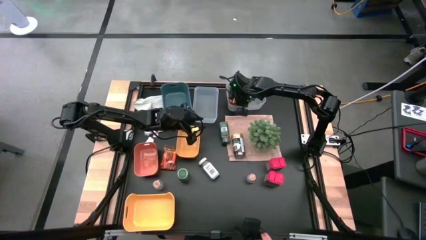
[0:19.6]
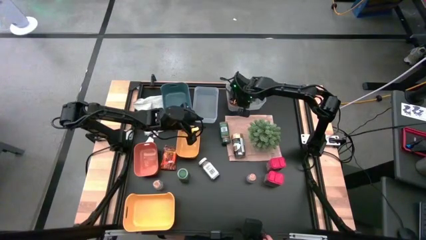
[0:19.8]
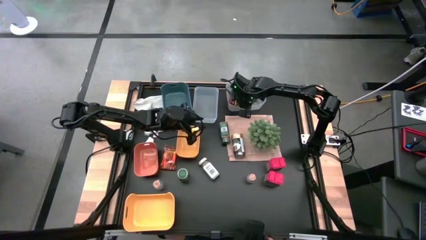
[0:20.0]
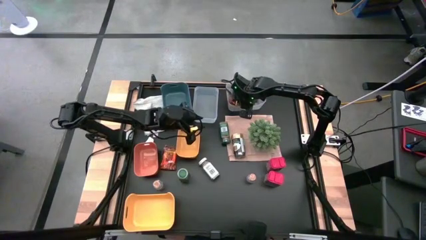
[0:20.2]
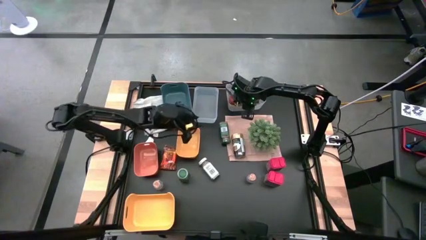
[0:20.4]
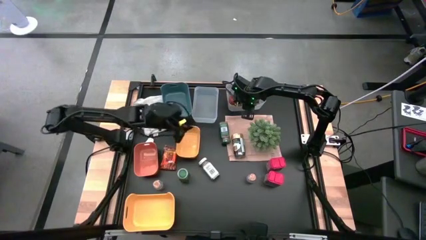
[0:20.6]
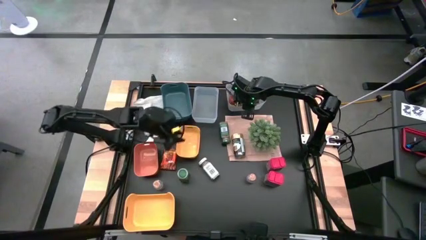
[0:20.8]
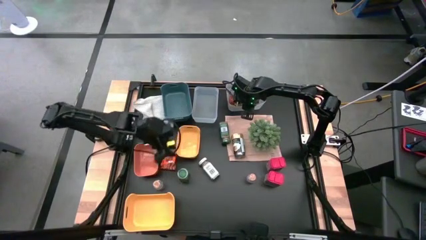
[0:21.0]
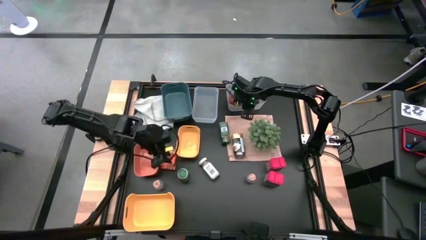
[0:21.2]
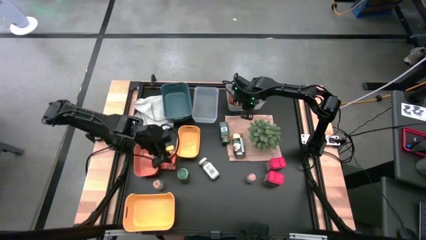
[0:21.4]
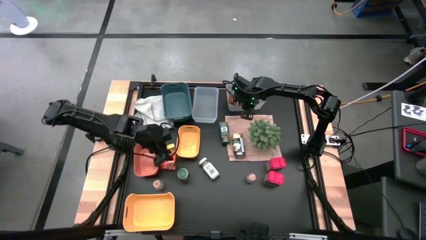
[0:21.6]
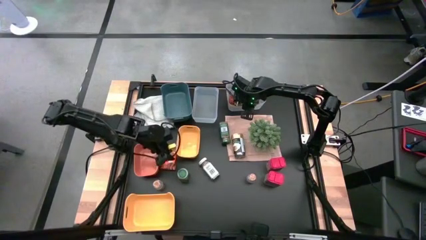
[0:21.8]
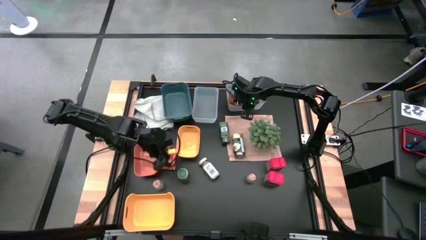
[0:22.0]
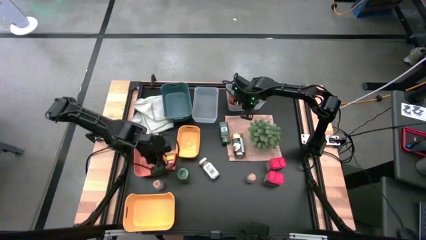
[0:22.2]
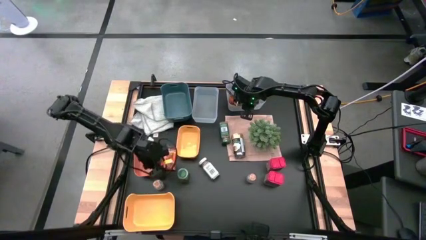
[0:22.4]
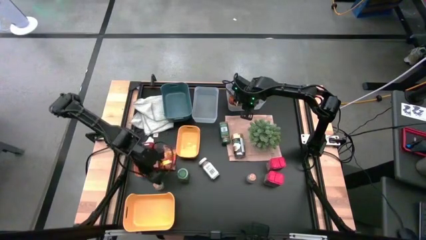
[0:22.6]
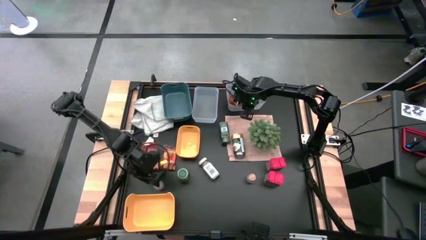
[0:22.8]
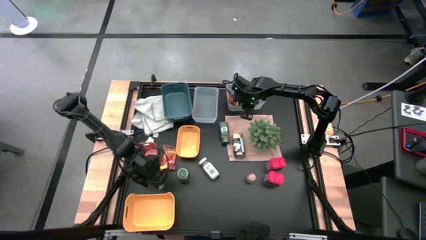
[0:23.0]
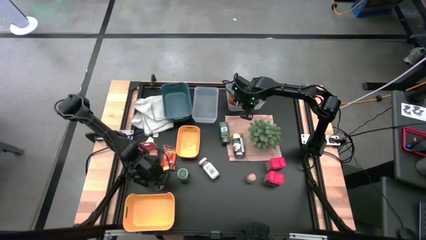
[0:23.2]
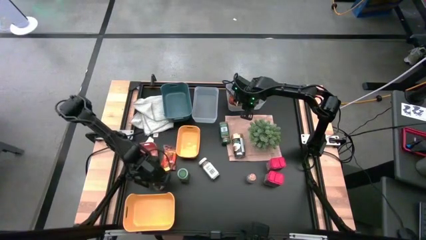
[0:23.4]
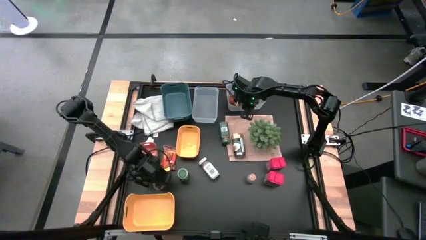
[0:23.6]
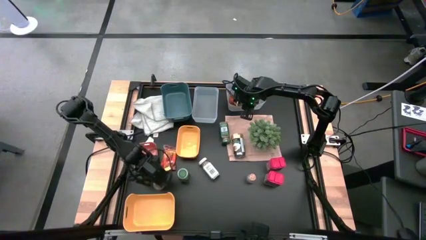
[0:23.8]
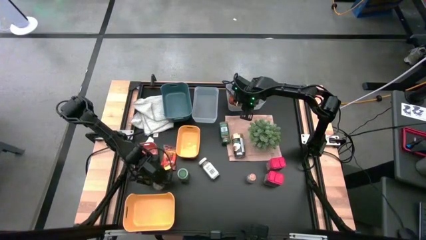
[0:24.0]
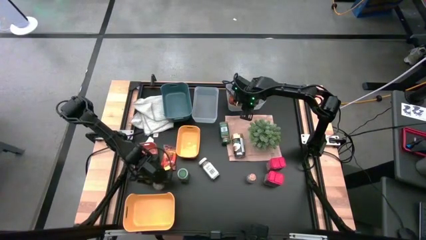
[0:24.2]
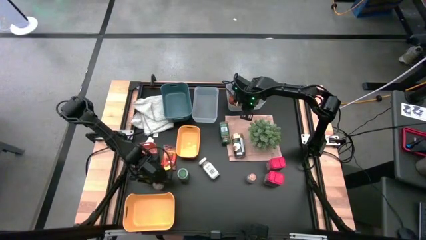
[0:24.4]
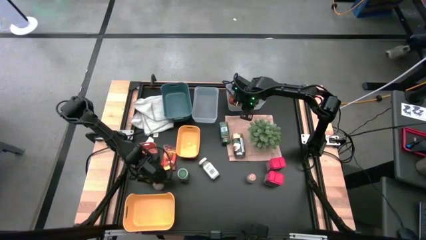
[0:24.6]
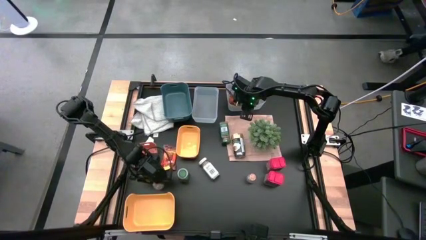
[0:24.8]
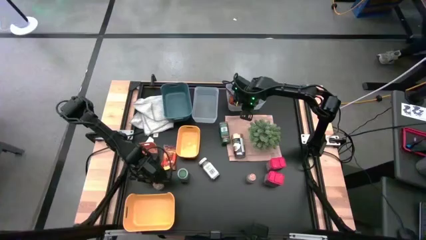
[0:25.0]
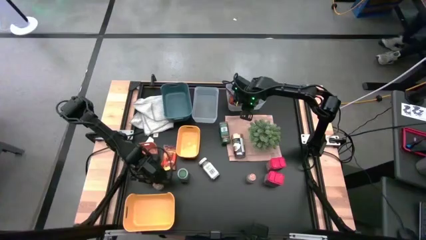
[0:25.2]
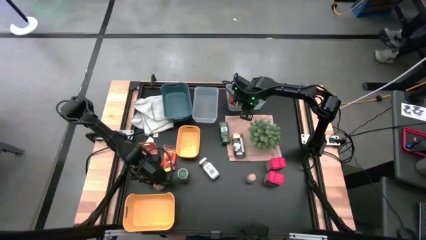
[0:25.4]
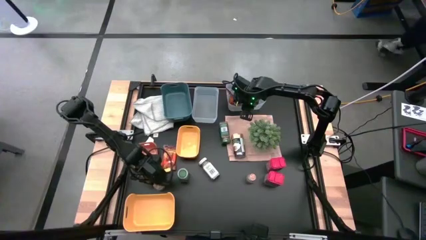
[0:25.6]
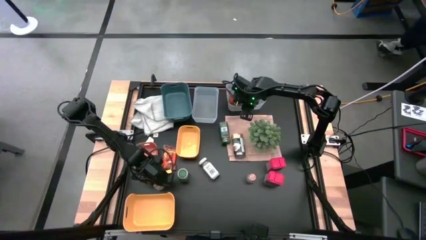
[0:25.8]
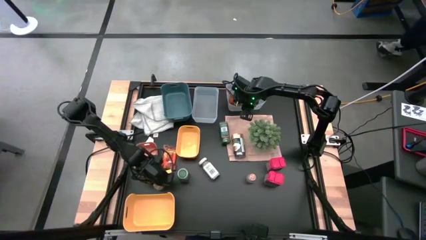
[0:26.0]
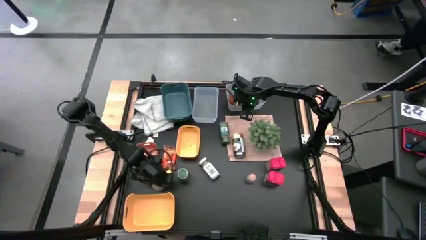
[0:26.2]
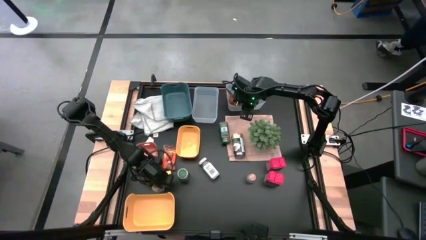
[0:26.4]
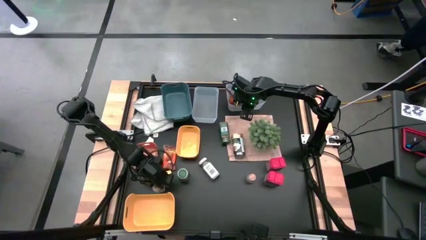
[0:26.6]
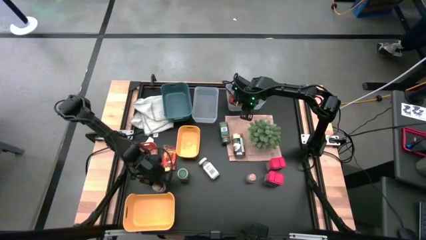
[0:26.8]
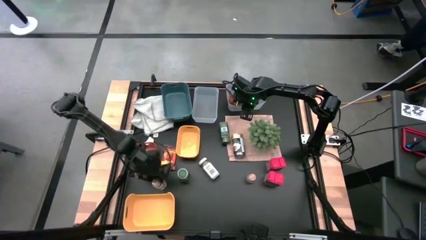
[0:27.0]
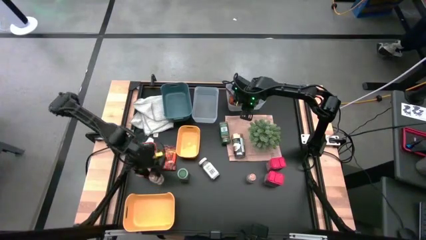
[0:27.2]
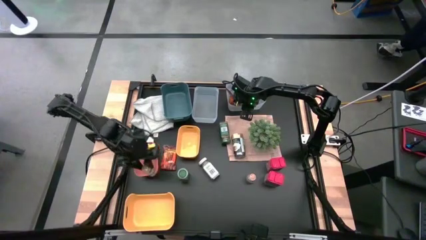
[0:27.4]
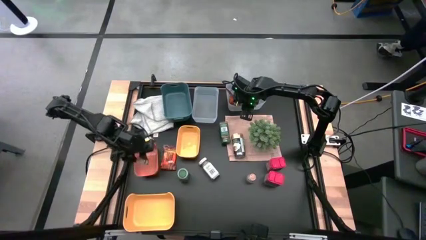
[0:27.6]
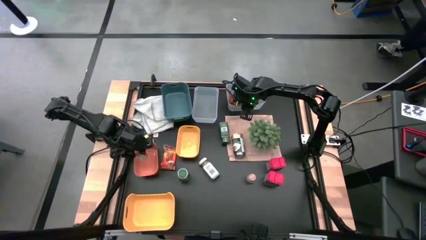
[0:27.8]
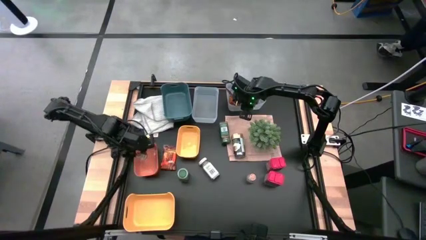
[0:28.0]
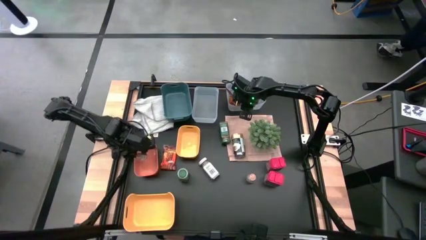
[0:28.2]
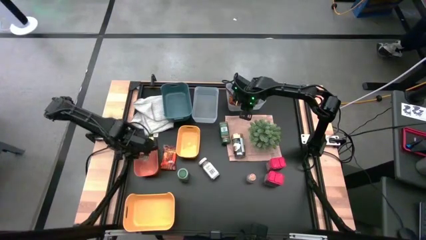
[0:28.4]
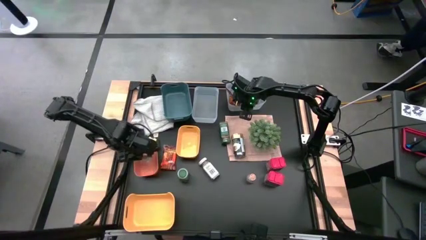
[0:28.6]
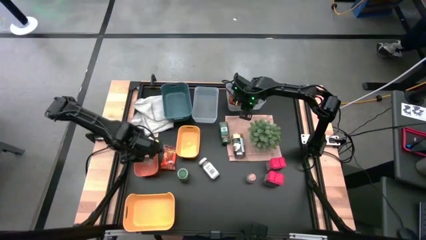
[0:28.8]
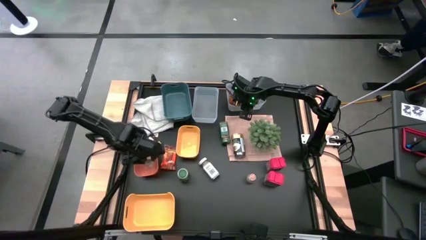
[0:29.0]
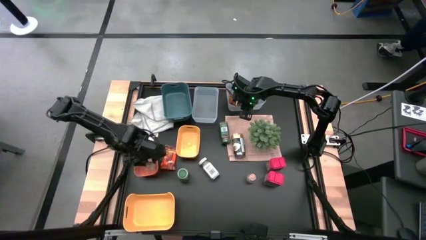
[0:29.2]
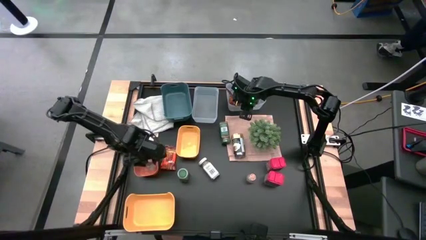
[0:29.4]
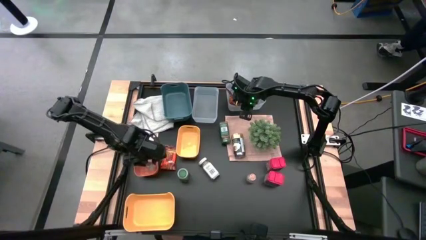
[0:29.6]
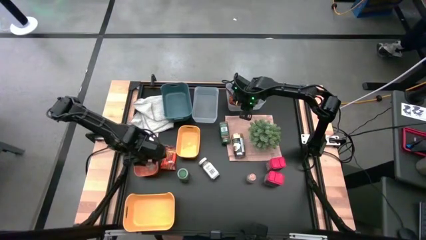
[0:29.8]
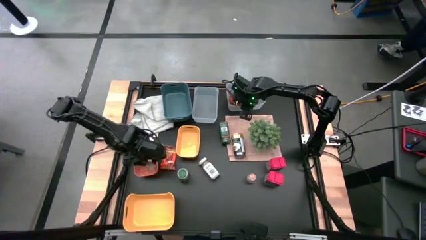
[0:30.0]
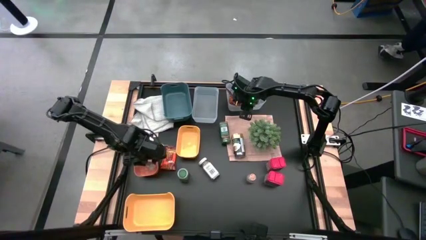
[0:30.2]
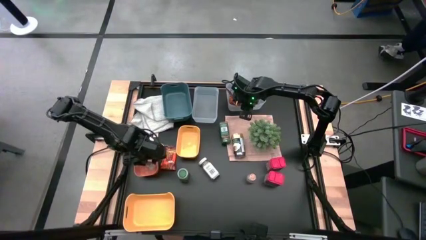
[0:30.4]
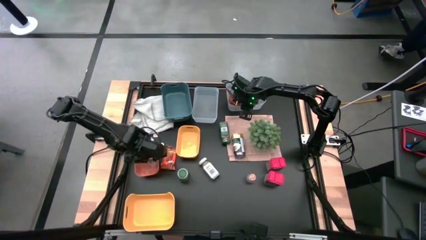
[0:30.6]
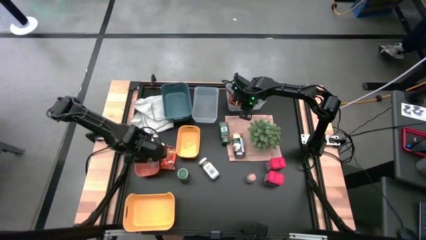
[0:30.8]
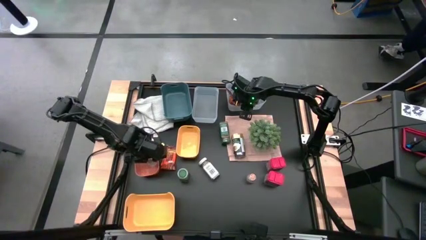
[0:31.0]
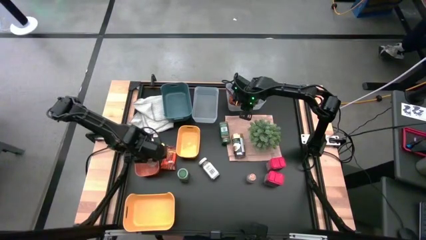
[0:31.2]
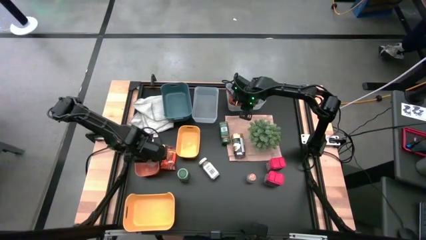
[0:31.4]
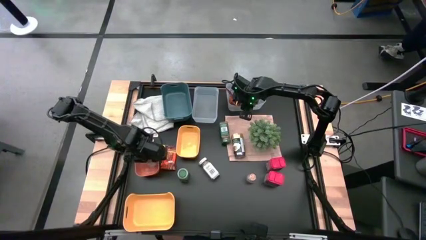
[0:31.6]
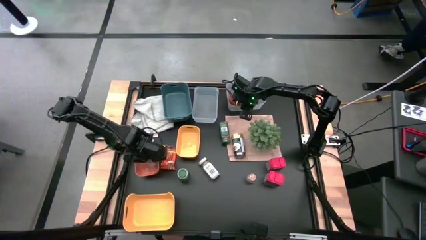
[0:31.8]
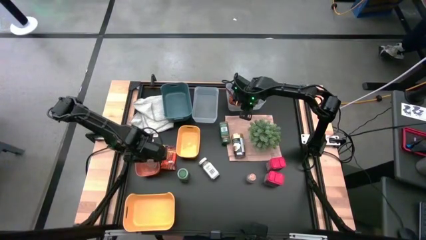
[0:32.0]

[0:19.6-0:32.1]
Task: Sort spices by type
Put the left brown seasoning bottle into the orange bin
